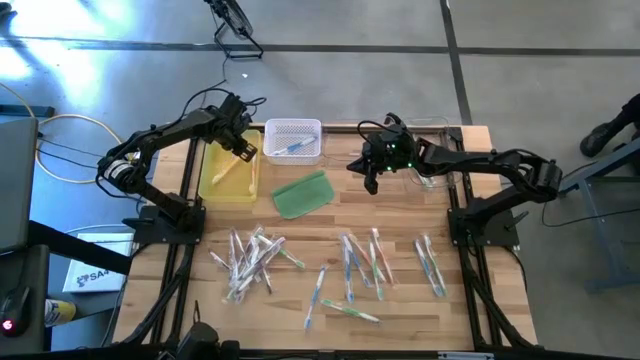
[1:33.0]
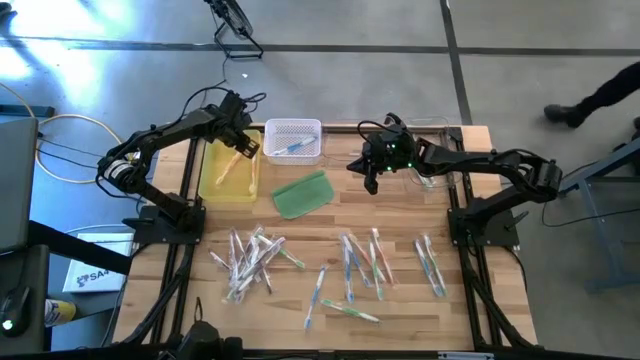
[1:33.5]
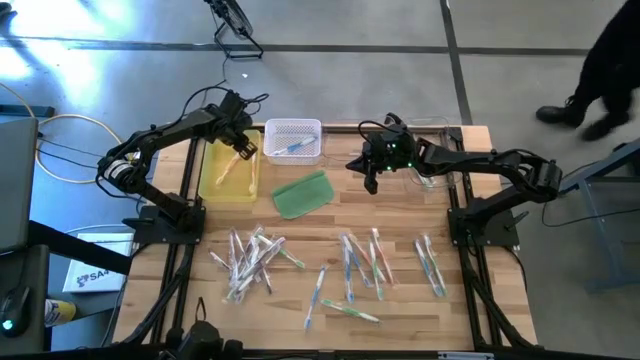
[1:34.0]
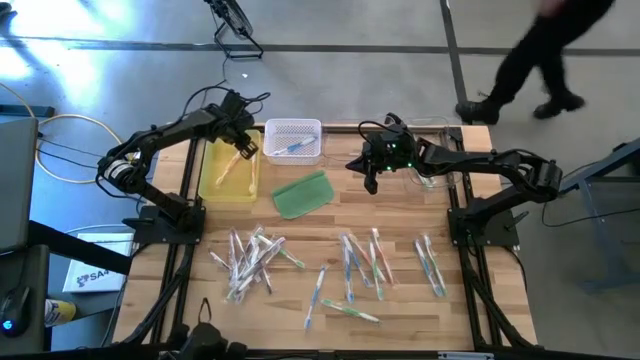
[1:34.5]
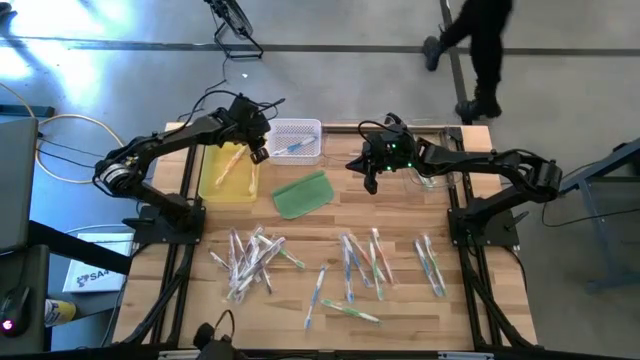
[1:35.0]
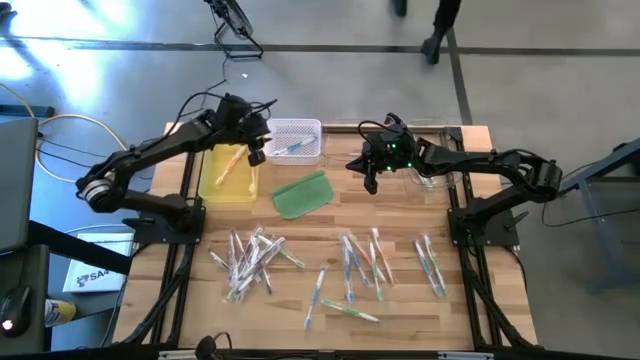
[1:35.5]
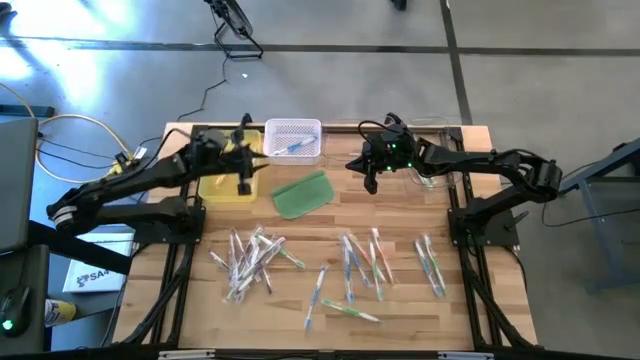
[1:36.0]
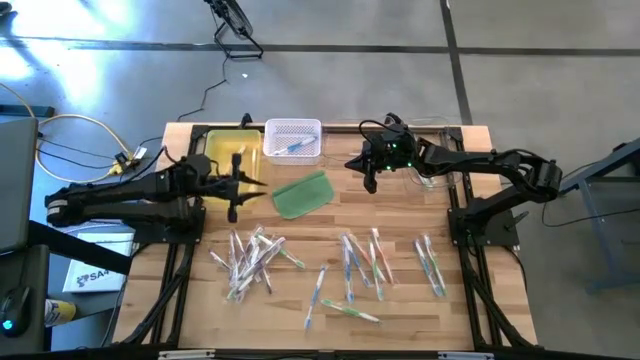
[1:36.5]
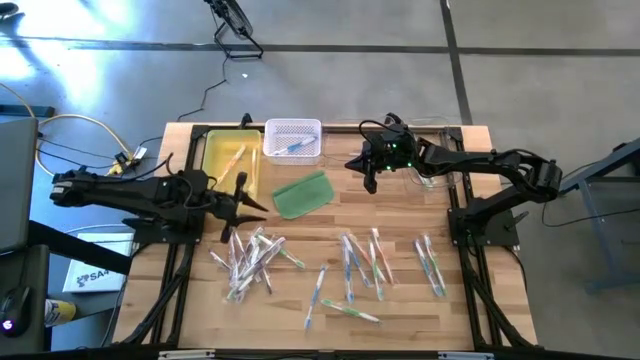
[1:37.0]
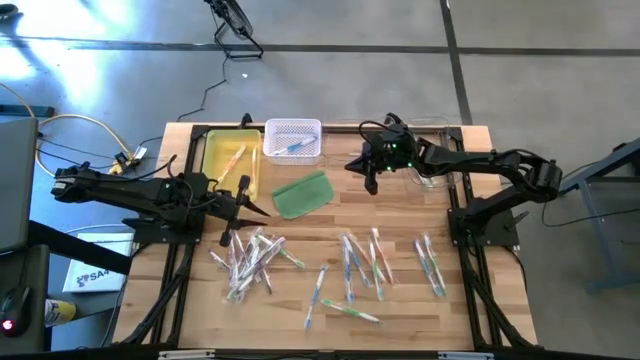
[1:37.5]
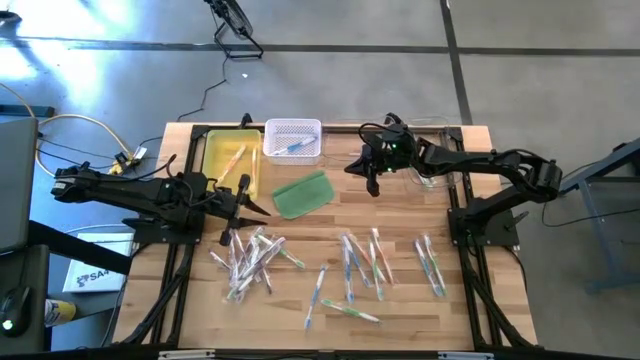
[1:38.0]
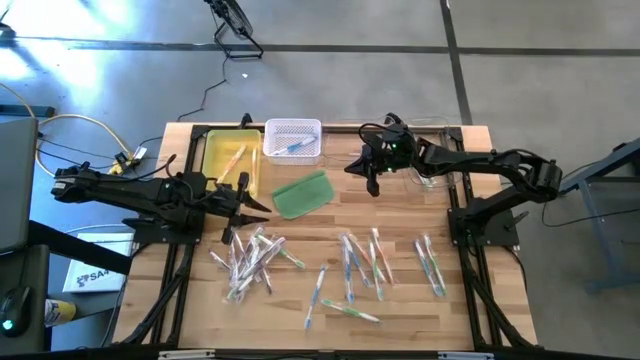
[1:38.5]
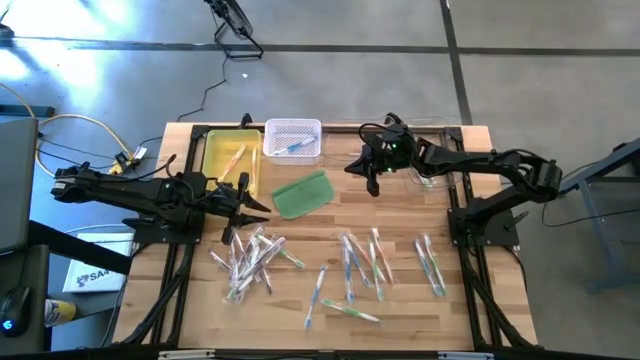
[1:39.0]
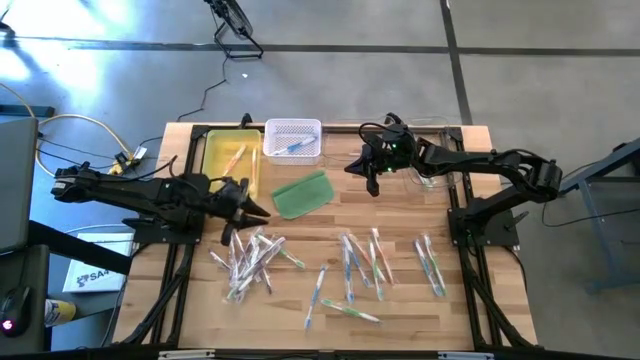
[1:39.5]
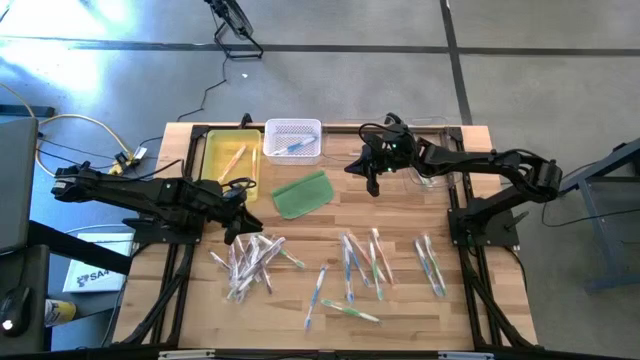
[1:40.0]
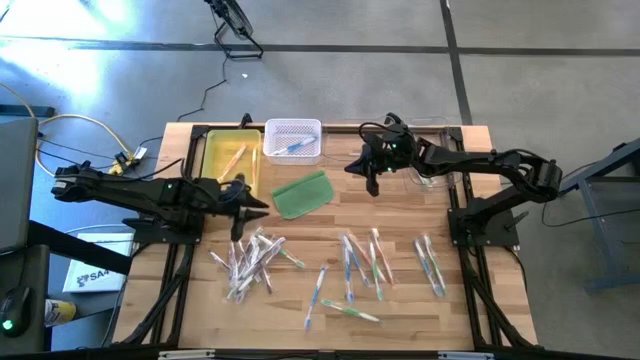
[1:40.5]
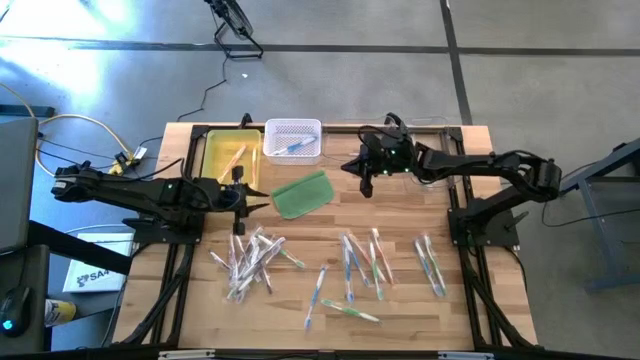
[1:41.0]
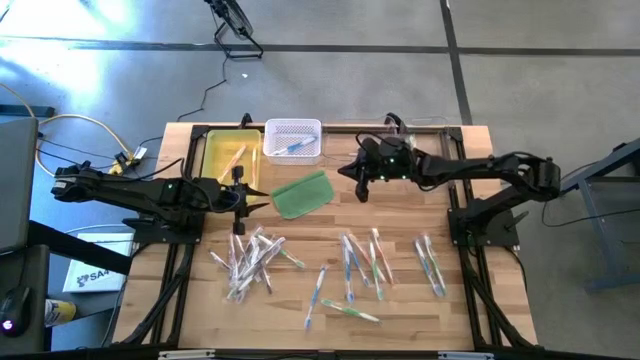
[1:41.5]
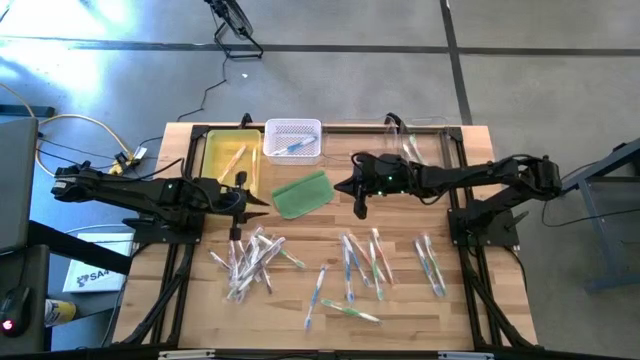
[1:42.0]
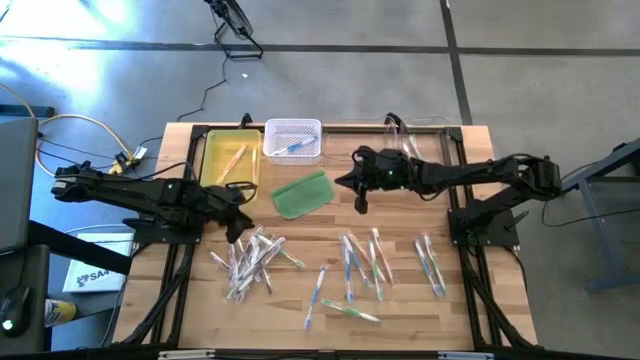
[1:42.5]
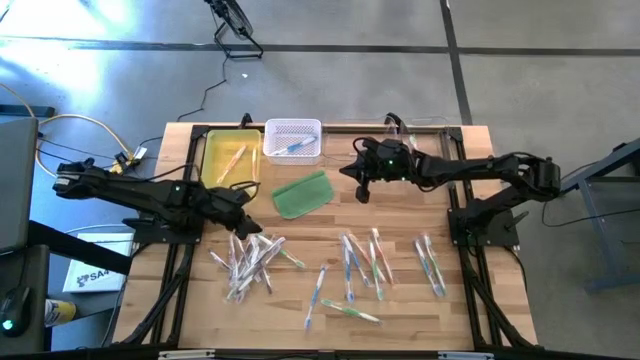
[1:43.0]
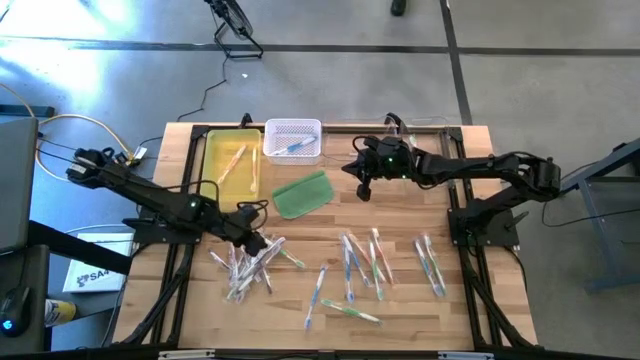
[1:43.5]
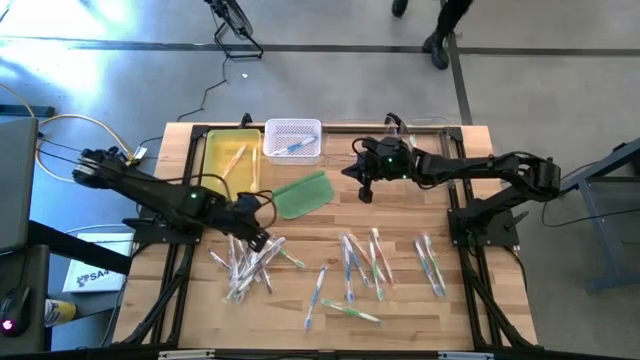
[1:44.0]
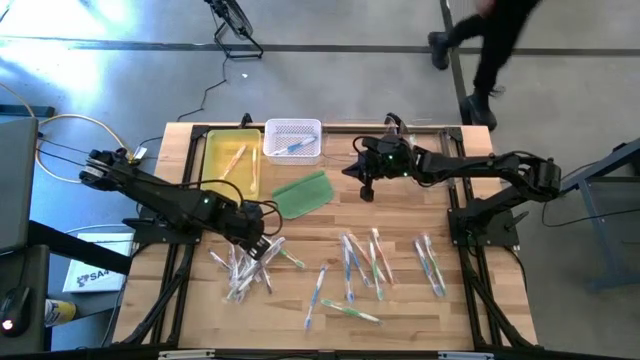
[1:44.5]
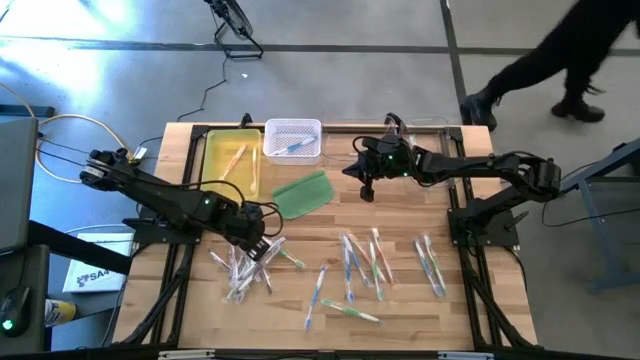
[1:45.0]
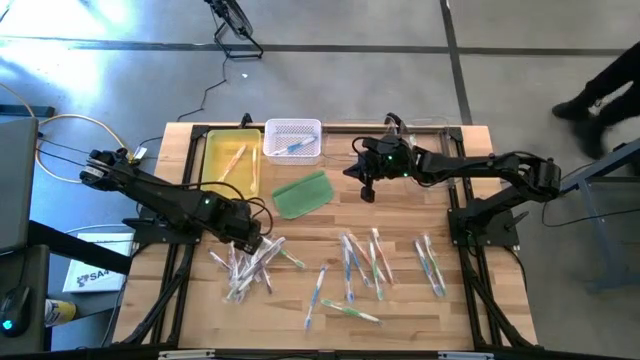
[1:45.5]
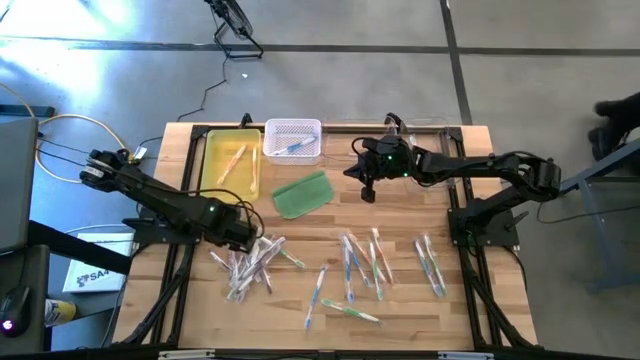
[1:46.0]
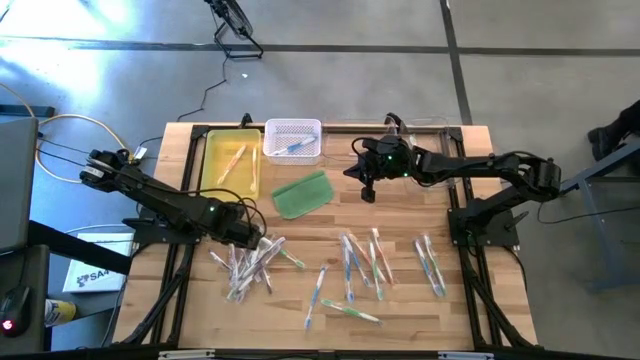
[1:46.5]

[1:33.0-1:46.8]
Task: Pick & Place Toothbrushes
Put the violet toothbrush into the left transparent bin

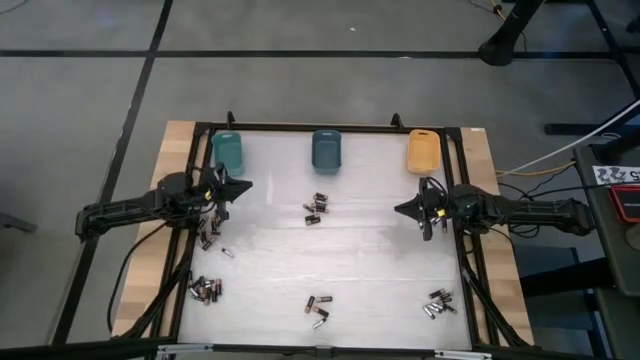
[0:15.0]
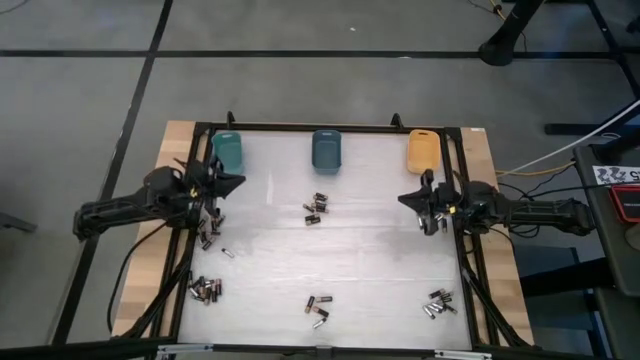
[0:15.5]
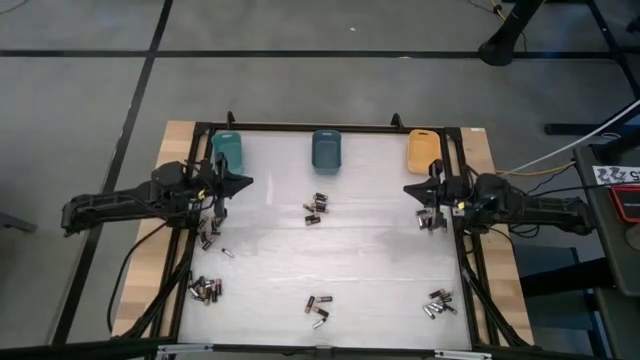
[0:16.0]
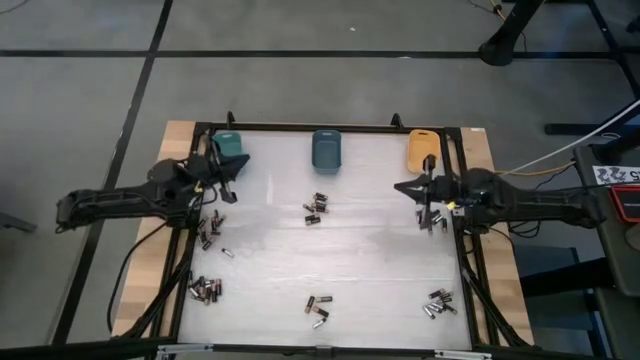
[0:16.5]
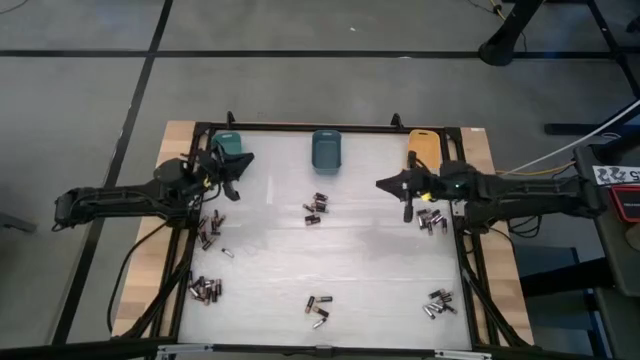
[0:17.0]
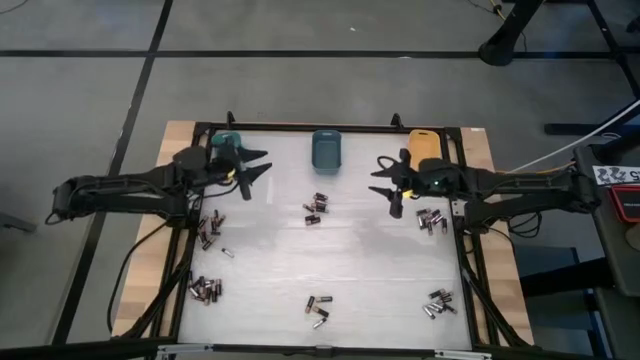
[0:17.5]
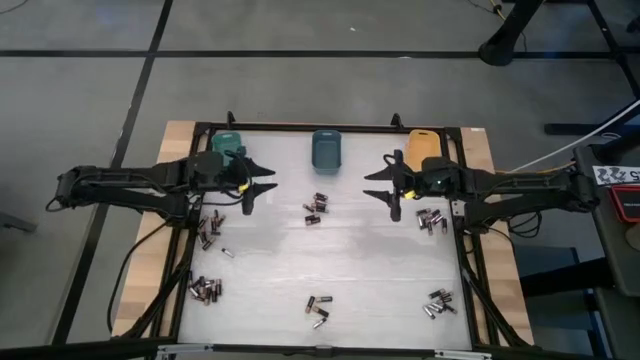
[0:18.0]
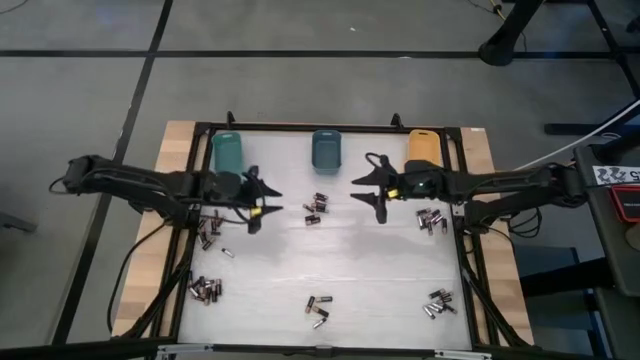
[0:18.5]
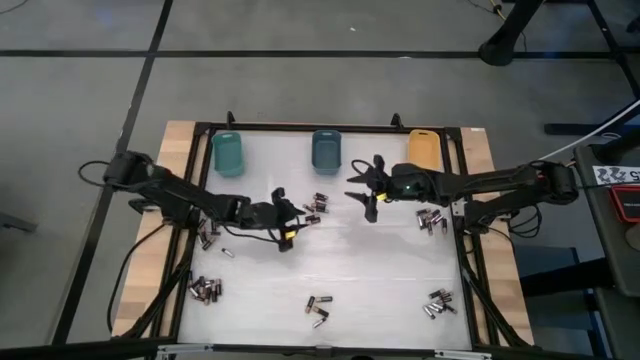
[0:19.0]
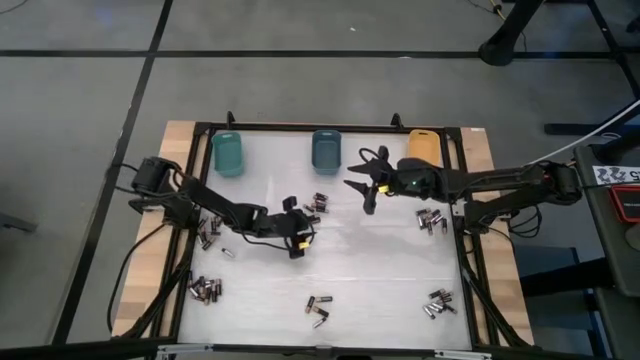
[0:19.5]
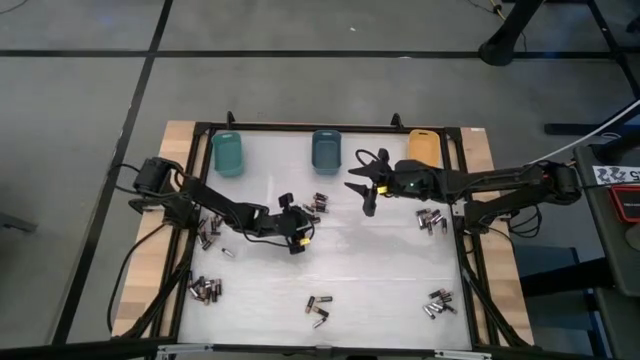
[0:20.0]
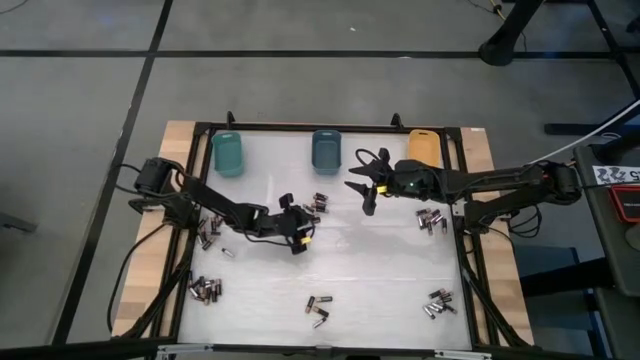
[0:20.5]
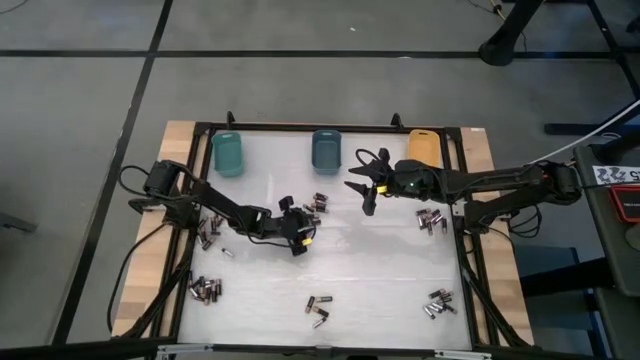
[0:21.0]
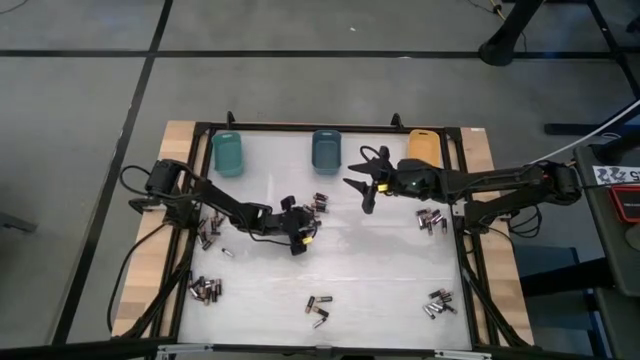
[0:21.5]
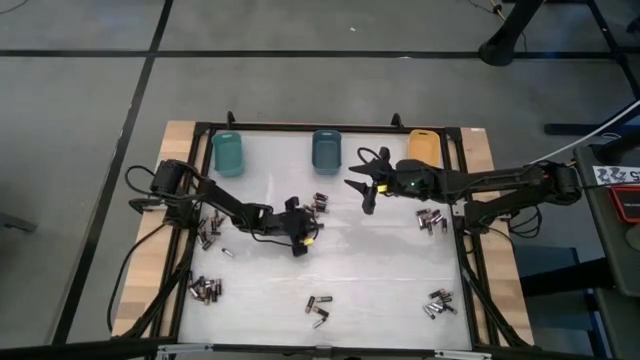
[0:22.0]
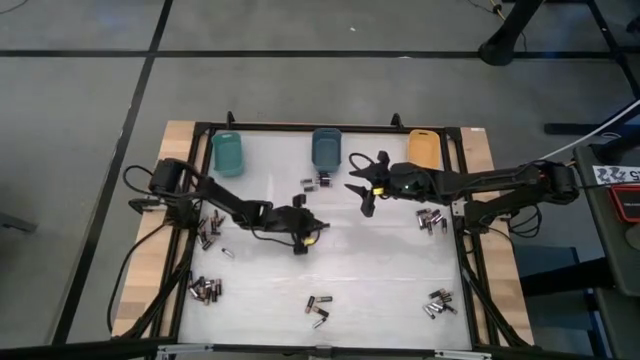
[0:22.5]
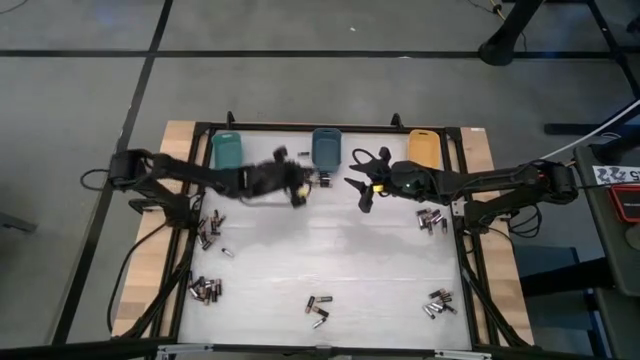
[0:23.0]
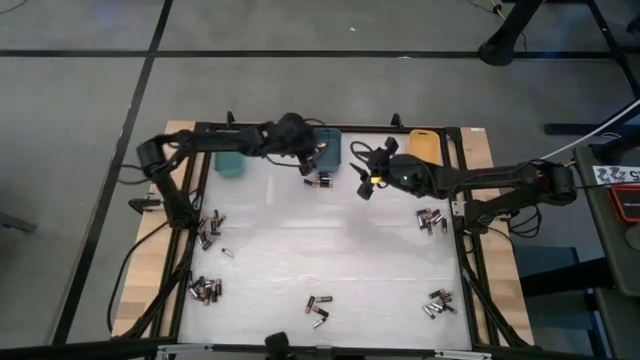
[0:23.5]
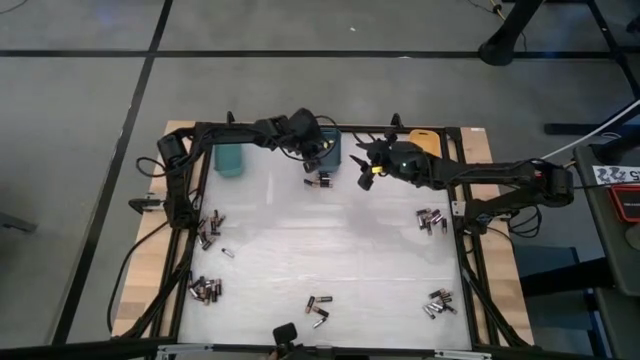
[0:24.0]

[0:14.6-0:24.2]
Task: Sort batteries
Put the brown battery into the blue bin
